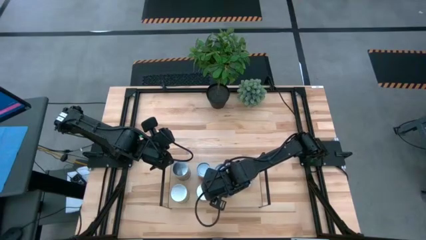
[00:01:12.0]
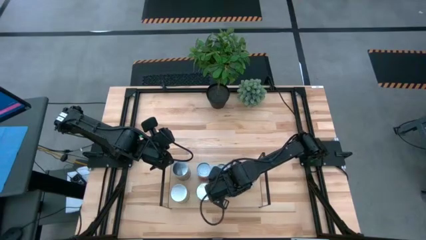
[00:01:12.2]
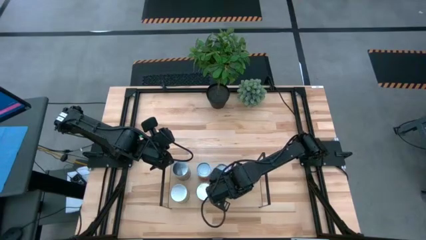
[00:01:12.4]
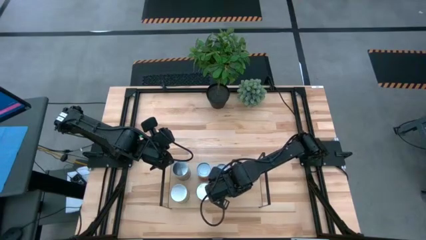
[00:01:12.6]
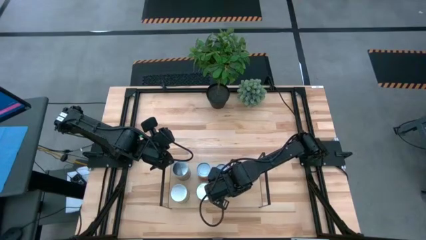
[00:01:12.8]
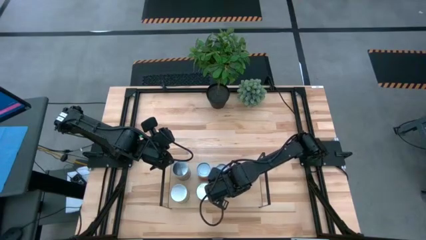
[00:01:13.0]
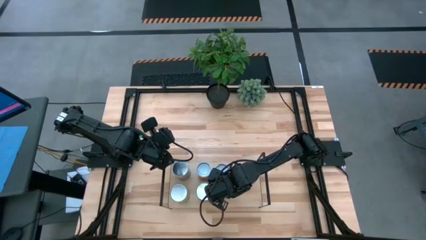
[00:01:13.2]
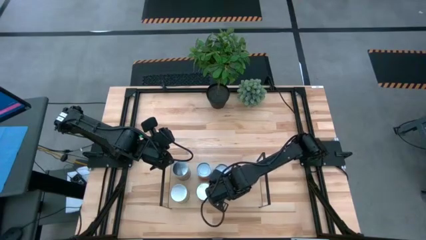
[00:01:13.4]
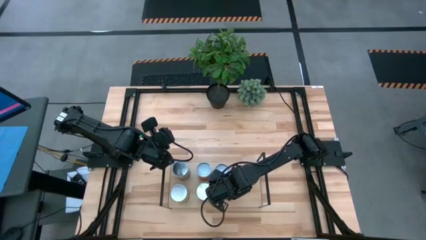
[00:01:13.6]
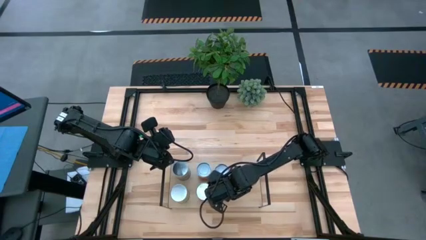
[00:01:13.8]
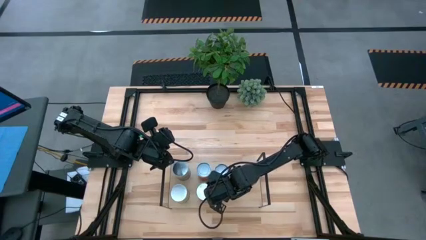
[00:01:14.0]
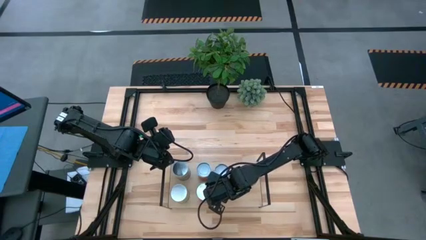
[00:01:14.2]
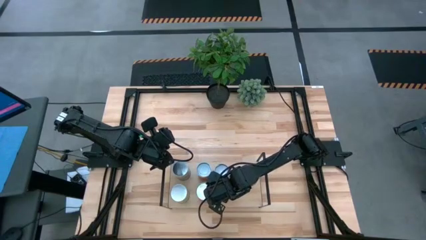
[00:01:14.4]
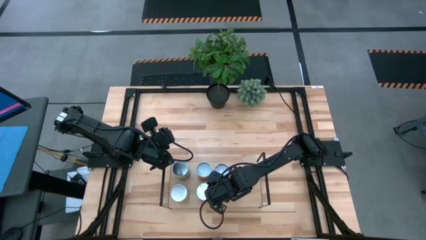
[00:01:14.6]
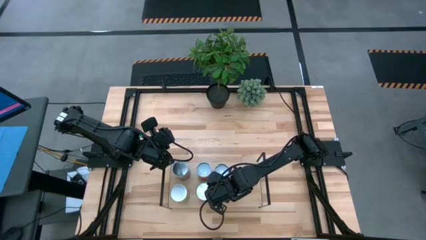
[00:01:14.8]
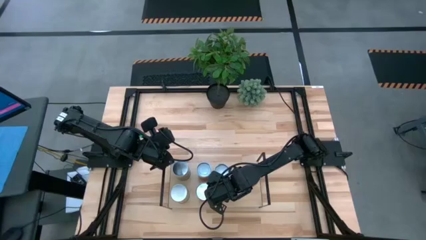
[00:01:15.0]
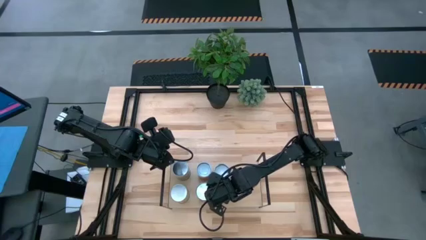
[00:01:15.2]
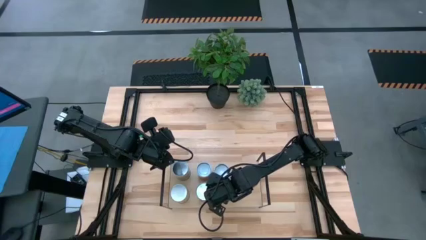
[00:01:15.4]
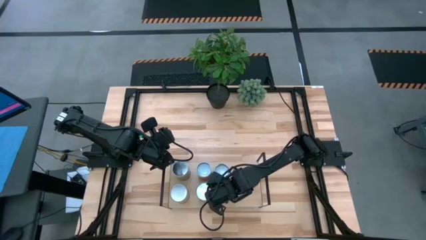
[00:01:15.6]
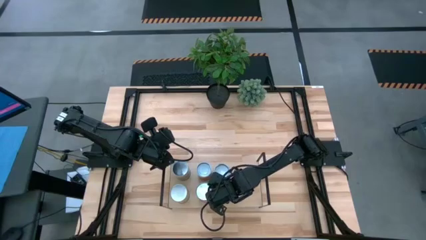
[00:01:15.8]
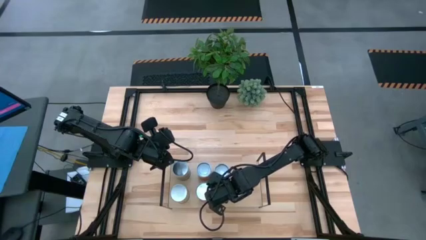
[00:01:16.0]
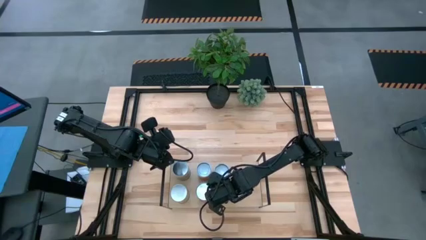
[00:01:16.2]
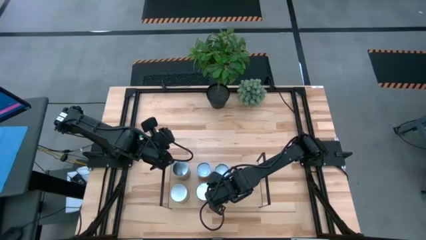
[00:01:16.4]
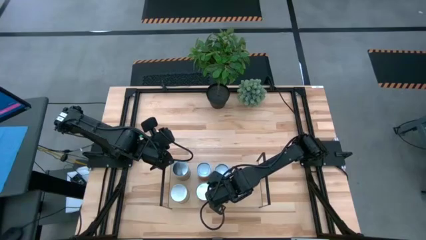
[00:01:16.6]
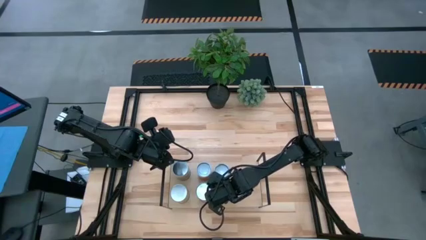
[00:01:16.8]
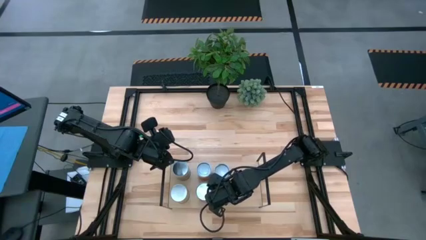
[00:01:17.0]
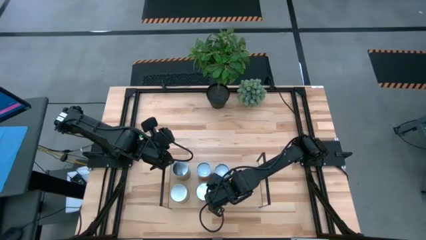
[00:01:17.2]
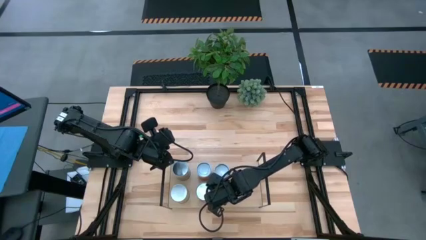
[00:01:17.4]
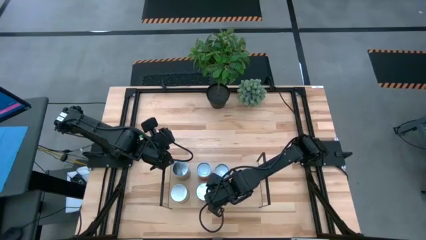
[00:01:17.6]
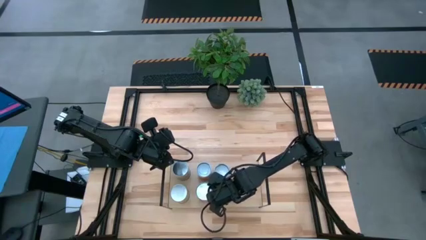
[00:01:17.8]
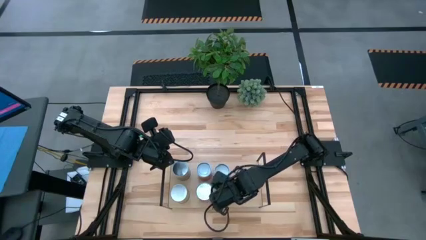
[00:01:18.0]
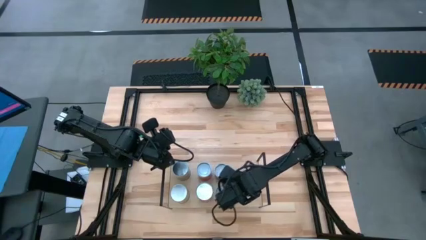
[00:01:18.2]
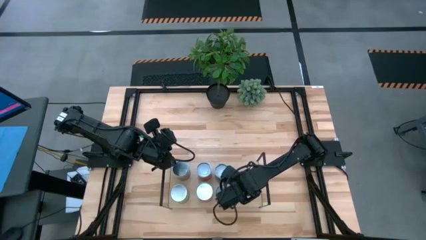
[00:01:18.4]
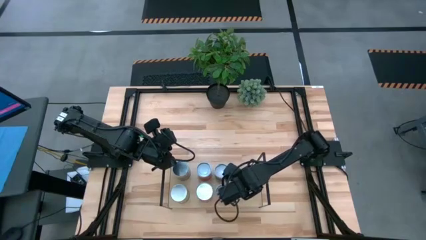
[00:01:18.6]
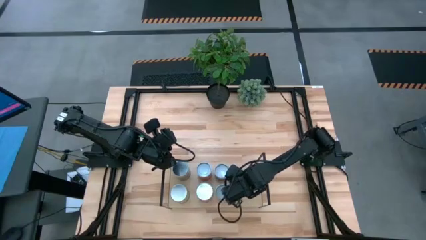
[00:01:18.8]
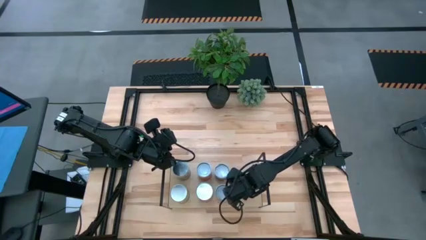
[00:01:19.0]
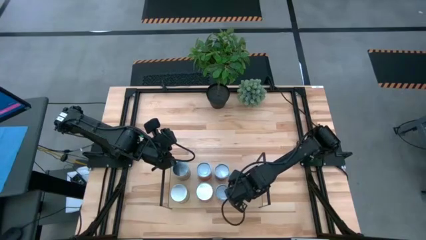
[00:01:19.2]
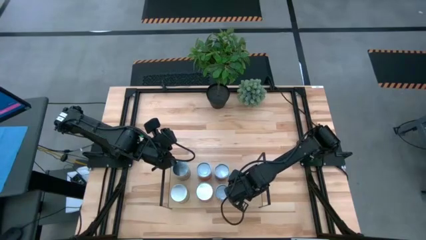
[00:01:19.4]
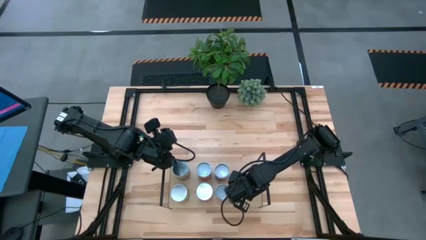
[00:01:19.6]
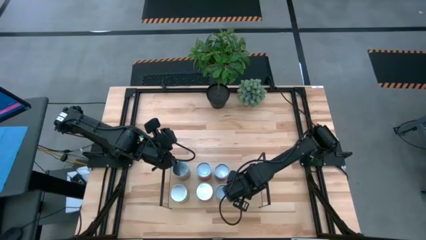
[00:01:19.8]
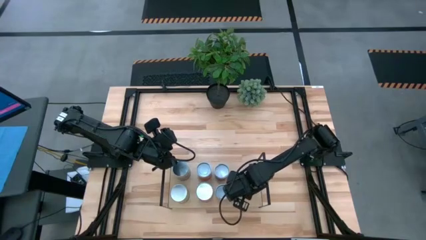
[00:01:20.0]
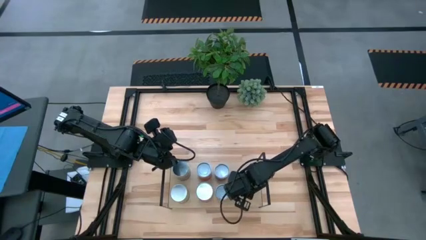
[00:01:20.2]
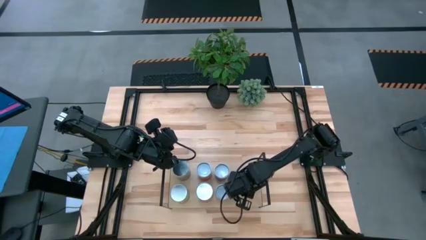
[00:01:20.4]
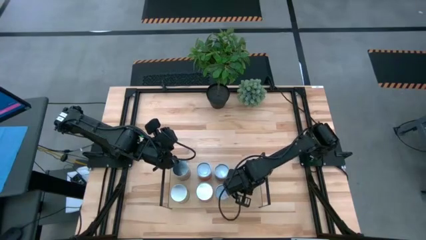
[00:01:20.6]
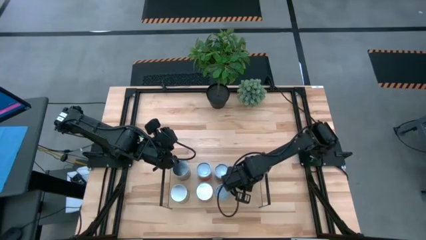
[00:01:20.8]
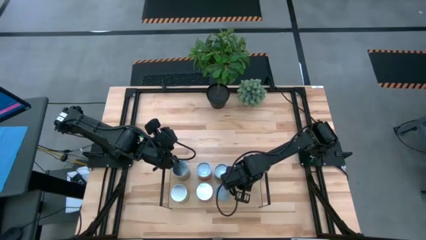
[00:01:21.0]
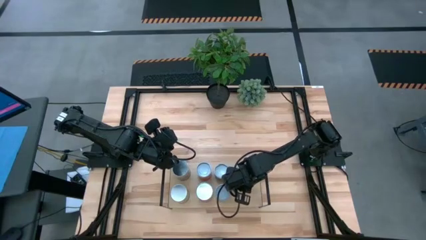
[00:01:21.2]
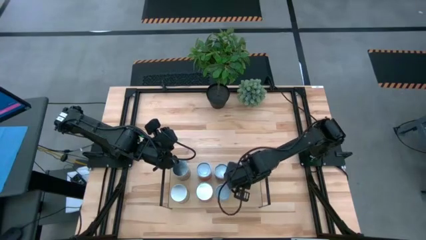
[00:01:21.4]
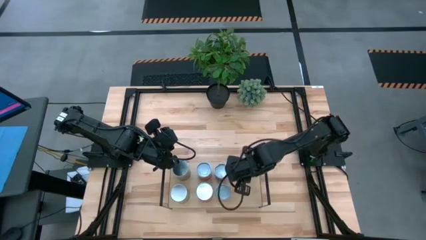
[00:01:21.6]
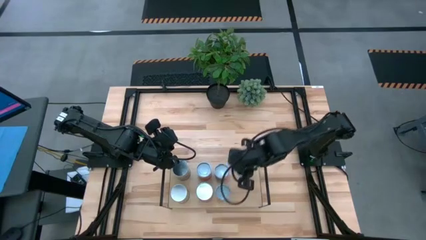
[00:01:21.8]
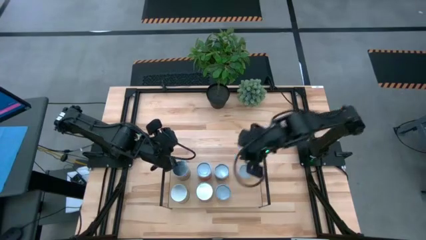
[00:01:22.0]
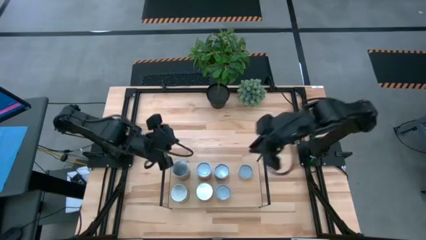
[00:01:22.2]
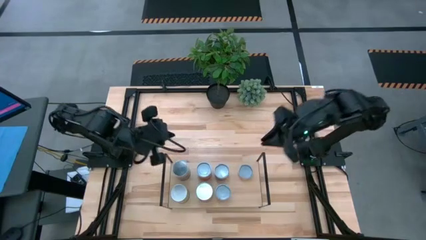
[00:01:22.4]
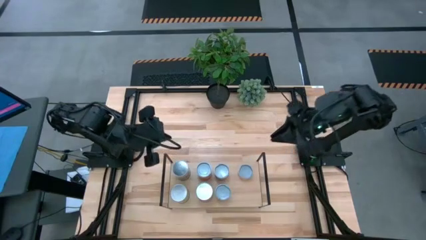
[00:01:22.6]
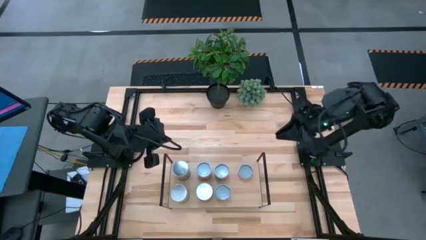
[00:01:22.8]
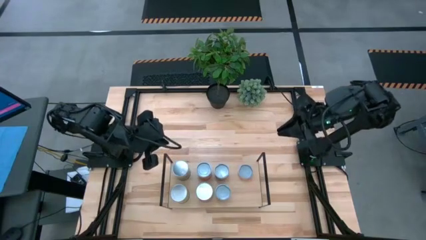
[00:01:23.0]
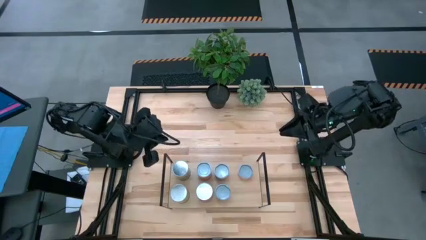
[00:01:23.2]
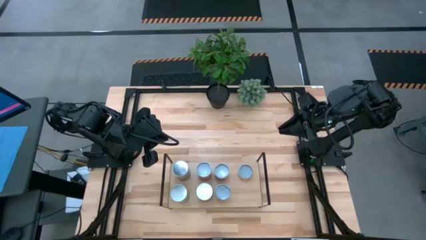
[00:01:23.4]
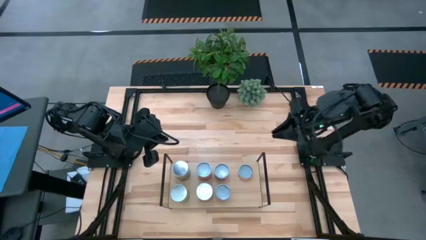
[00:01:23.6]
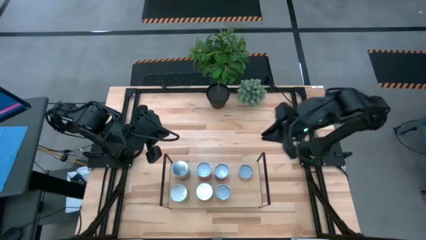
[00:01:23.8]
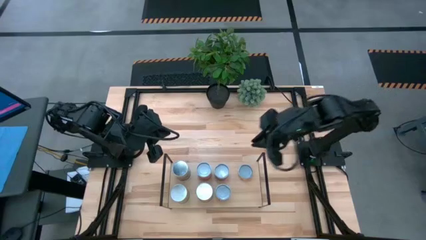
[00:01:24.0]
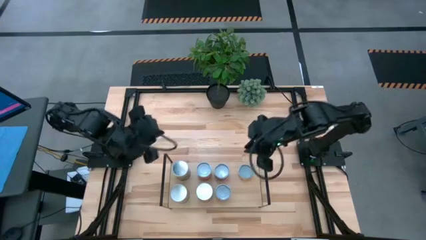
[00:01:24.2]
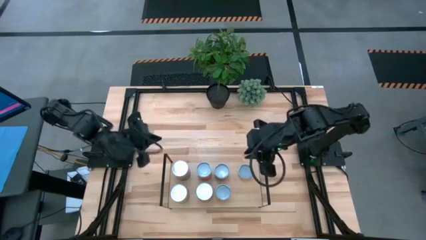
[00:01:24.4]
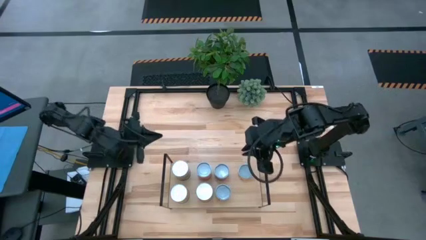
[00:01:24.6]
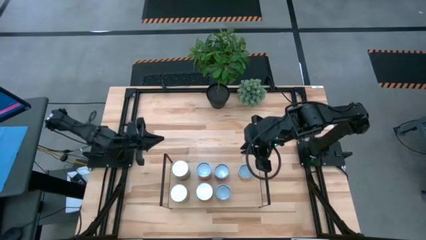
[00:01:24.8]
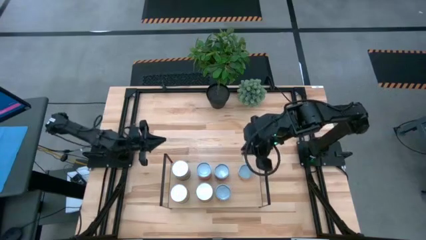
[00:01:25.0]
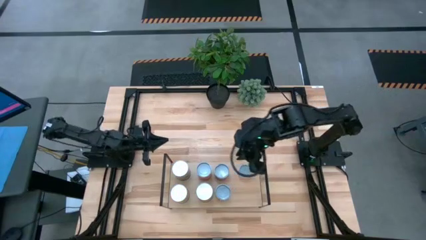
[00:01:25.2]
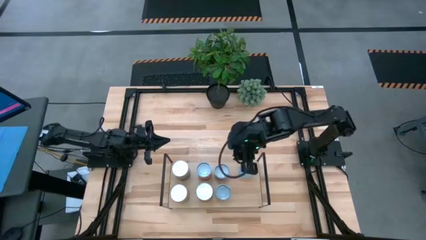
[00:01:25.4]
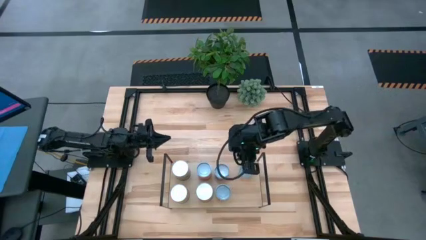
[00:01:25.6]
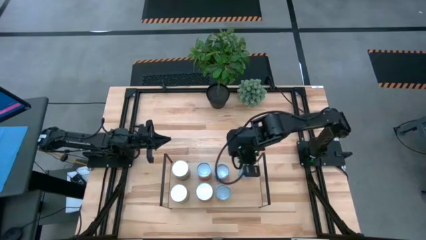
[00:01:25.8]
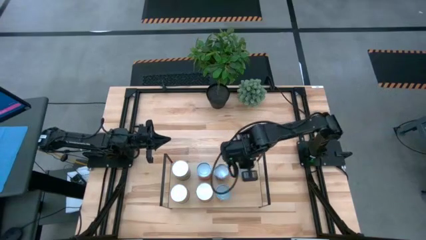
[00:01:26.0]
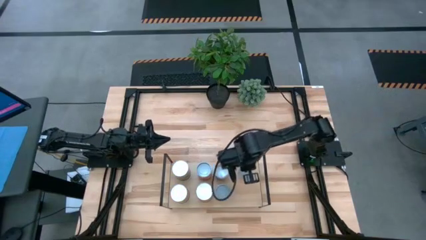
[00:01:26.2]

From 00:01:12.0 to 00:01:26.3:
Task: Pick and place cans onto a shelf
Adjust the canned goods on the shelf

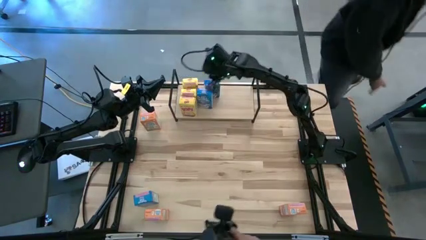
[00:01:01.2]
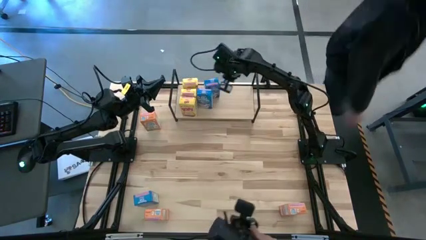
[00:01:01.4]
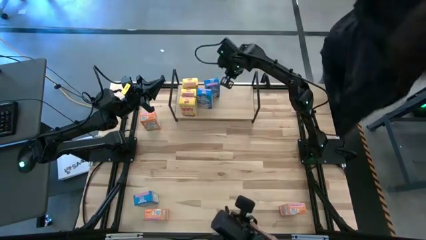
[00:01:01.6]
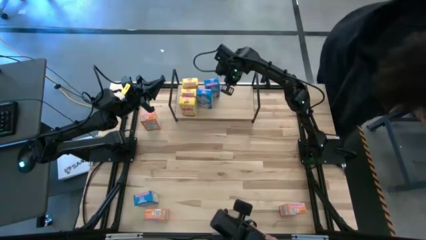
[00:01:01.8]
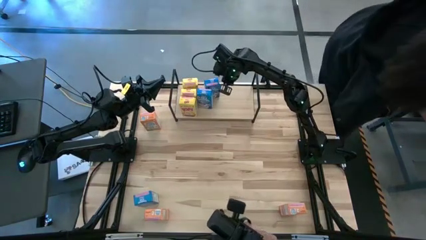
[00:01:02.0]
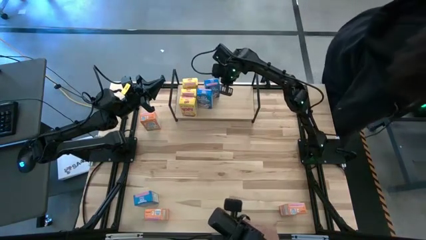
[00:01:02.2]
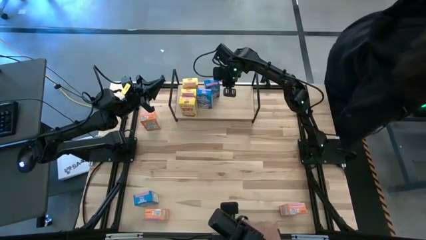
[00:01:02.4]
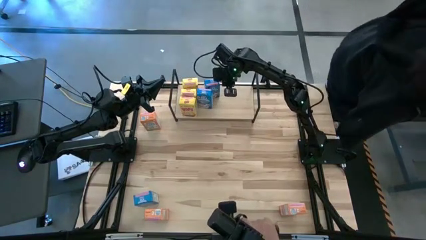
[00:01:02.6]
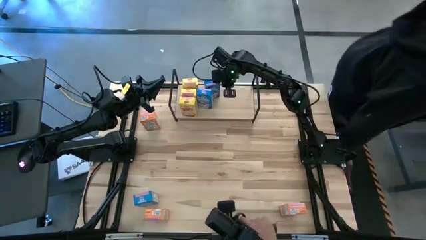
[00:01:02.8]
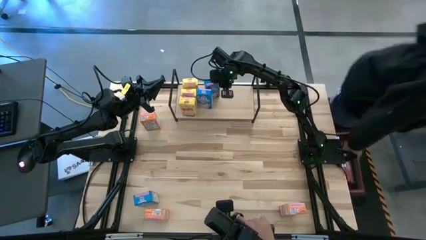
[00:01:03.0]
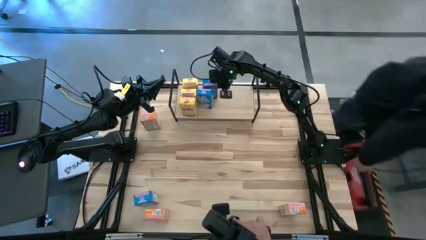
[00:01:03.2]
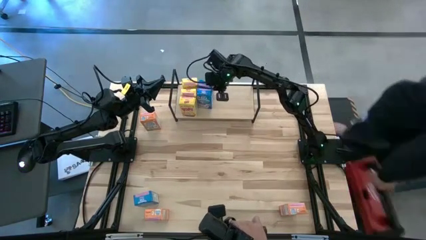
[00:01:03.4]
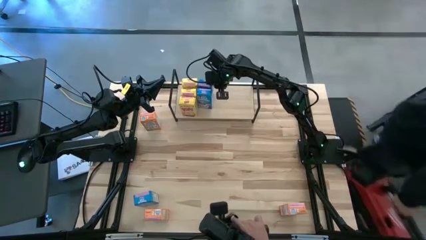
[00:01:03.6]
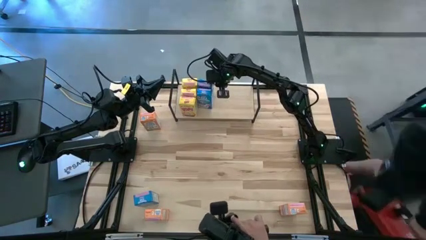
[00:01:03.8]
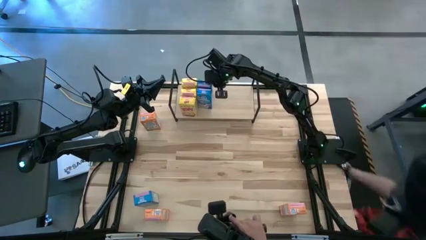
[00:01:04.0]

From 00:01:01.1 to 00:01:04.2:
Task: Stack cereal on shelf
Adjust the blue cereal box on the shelf
